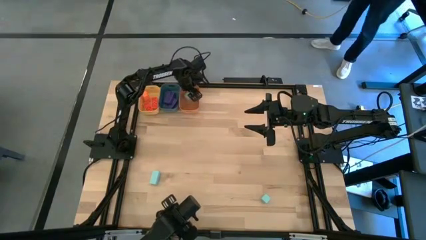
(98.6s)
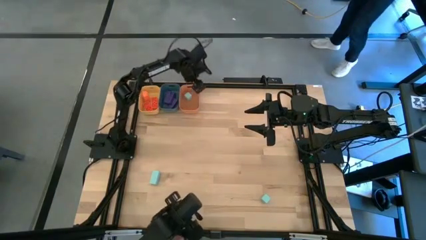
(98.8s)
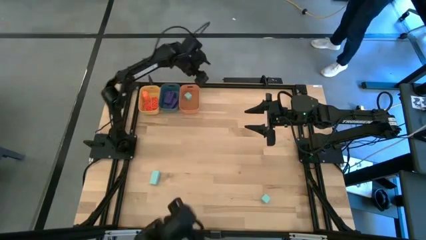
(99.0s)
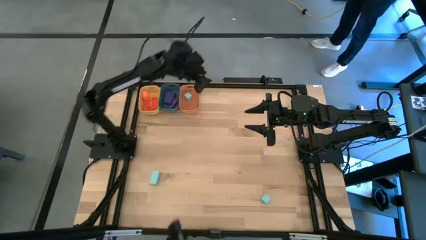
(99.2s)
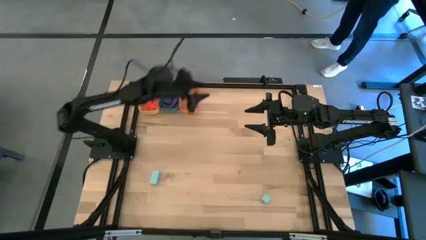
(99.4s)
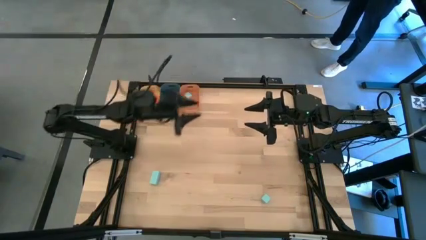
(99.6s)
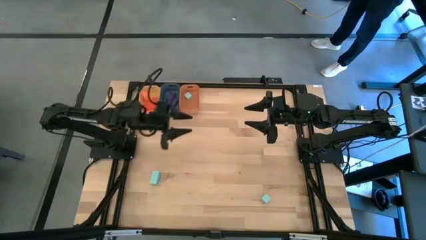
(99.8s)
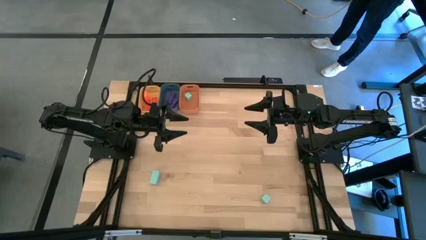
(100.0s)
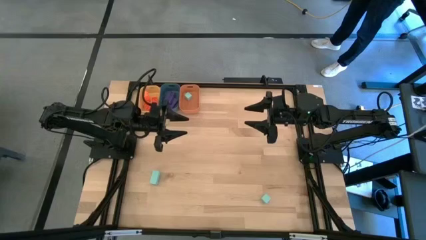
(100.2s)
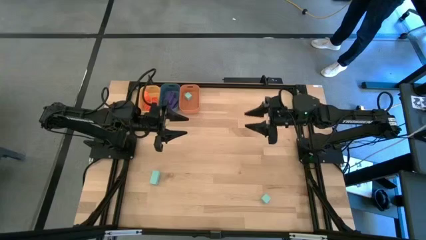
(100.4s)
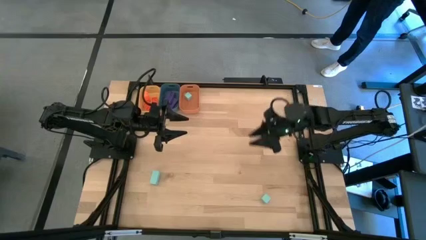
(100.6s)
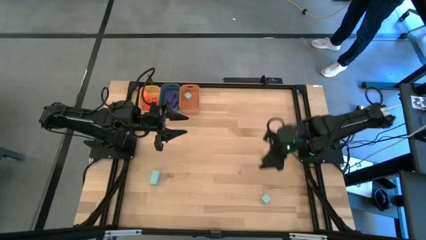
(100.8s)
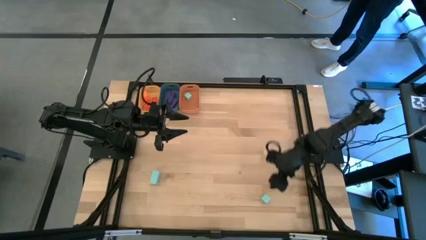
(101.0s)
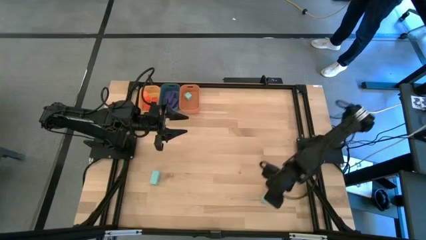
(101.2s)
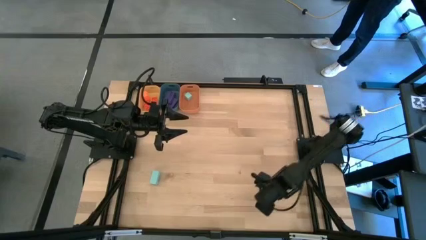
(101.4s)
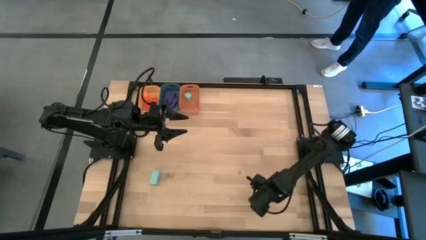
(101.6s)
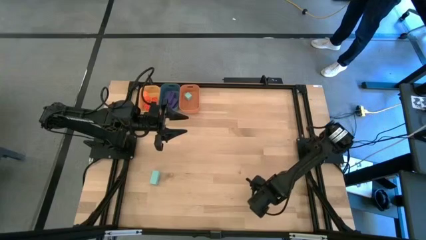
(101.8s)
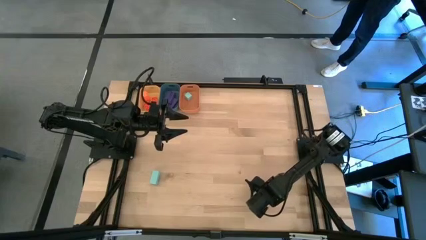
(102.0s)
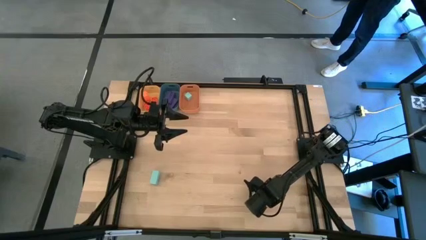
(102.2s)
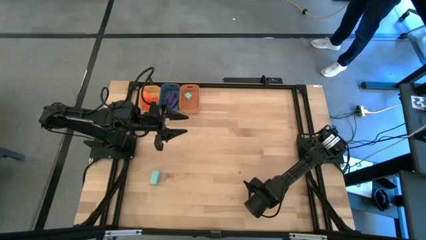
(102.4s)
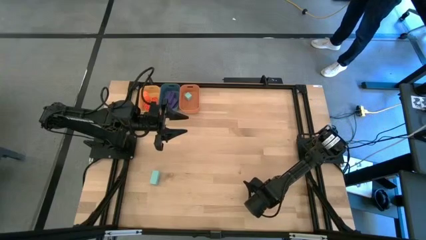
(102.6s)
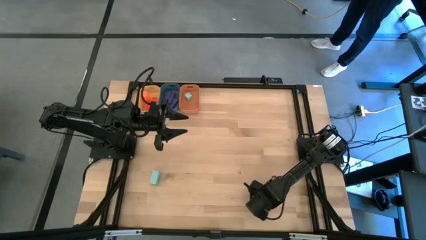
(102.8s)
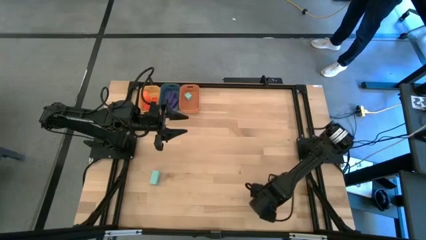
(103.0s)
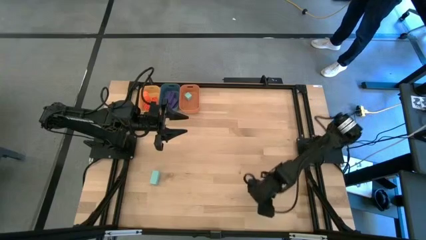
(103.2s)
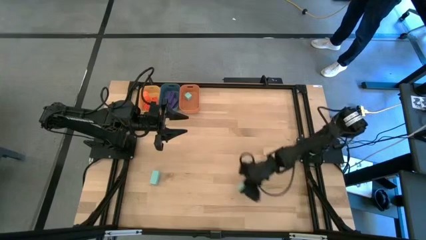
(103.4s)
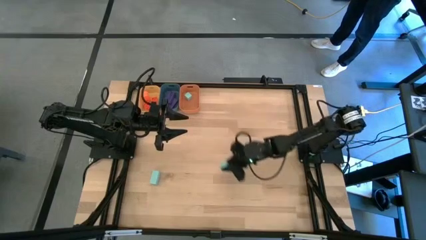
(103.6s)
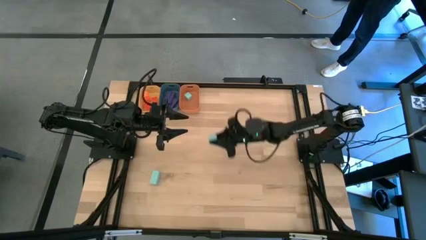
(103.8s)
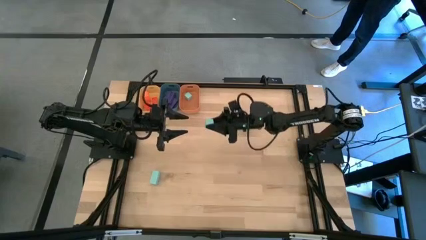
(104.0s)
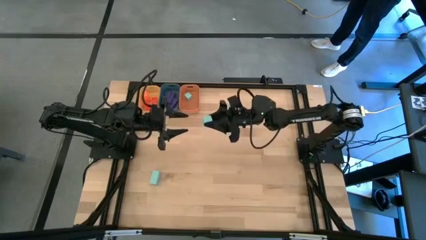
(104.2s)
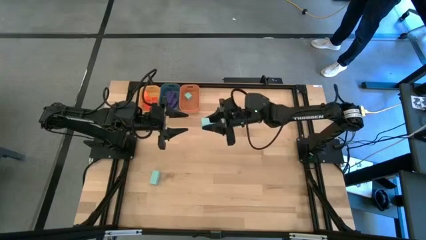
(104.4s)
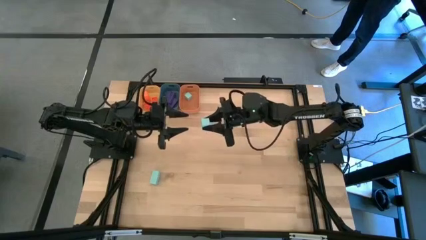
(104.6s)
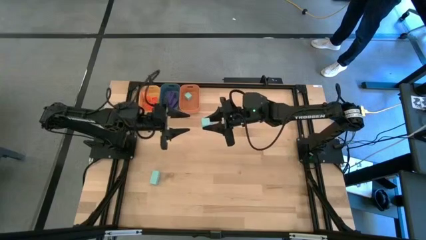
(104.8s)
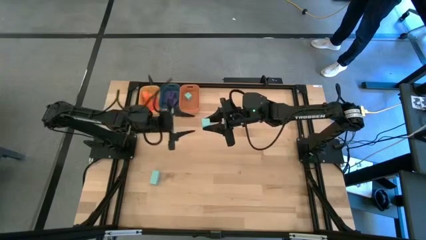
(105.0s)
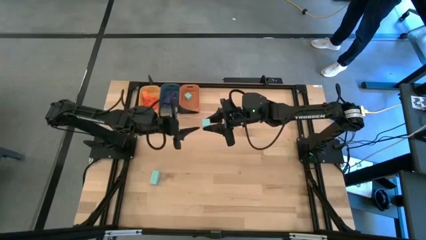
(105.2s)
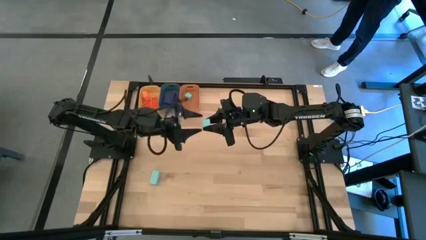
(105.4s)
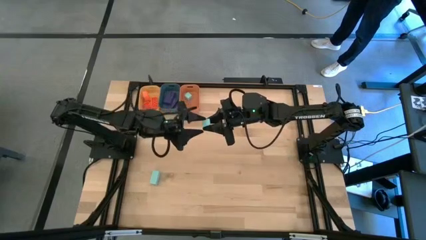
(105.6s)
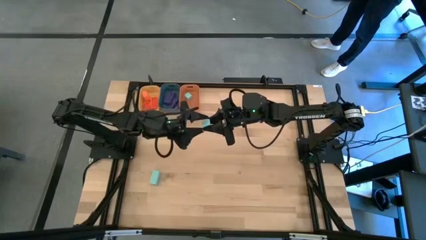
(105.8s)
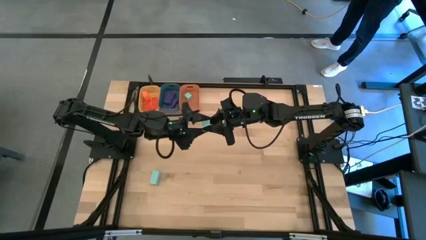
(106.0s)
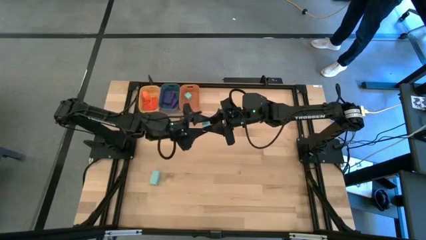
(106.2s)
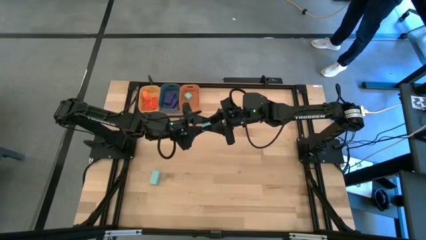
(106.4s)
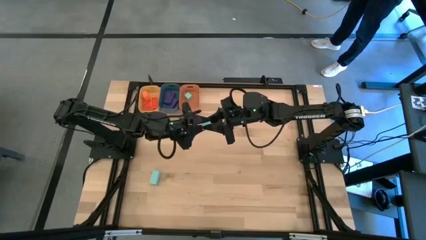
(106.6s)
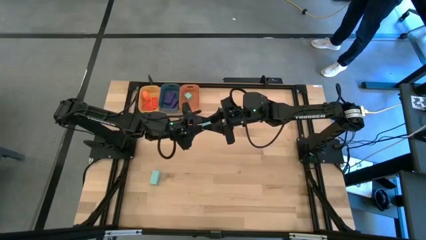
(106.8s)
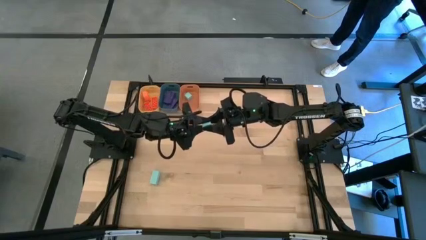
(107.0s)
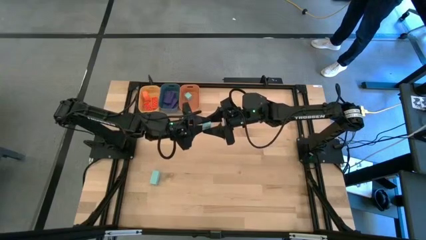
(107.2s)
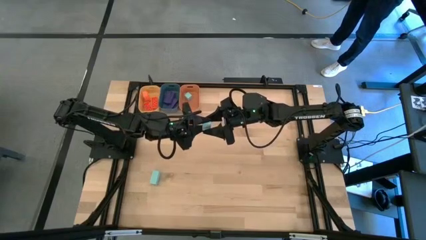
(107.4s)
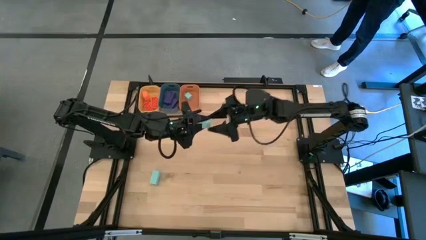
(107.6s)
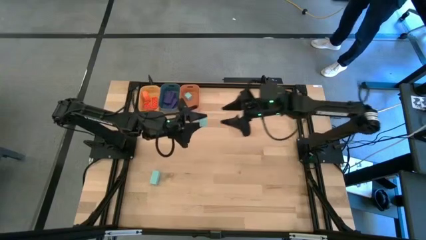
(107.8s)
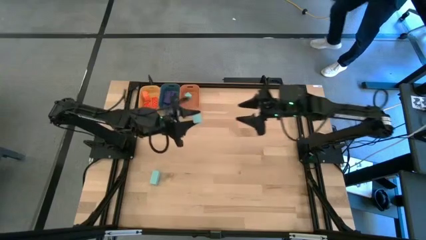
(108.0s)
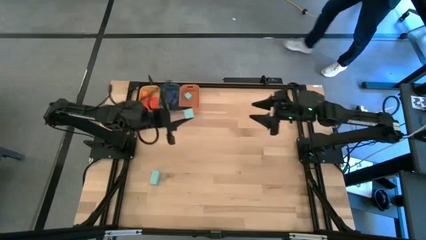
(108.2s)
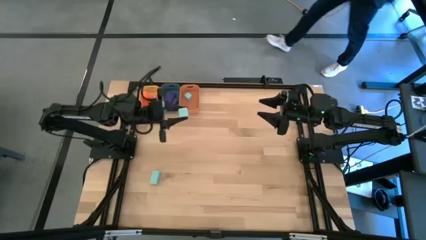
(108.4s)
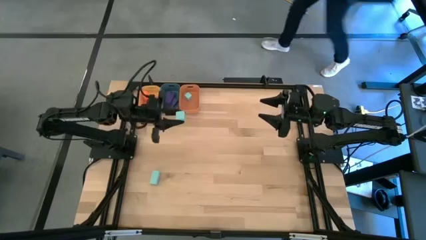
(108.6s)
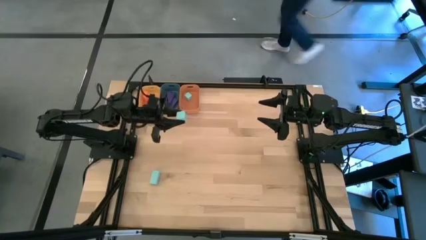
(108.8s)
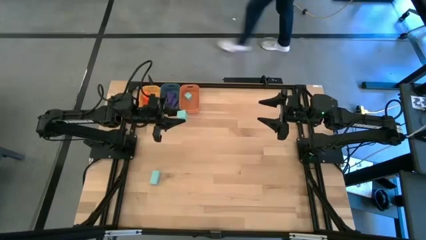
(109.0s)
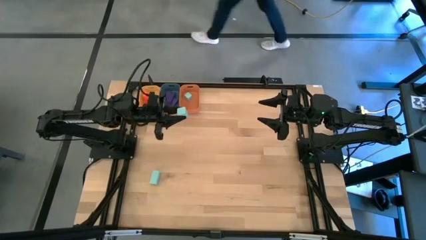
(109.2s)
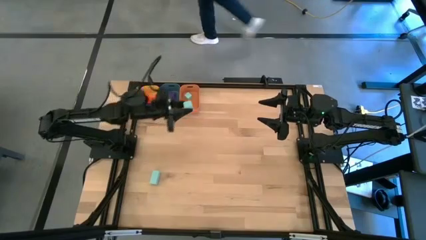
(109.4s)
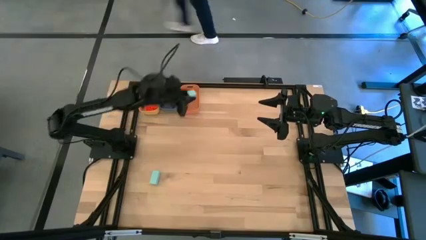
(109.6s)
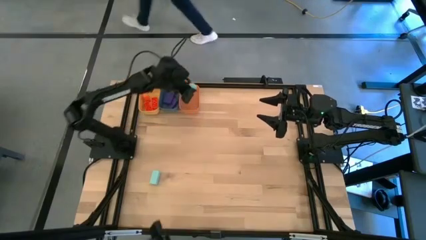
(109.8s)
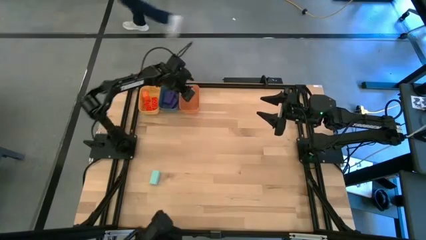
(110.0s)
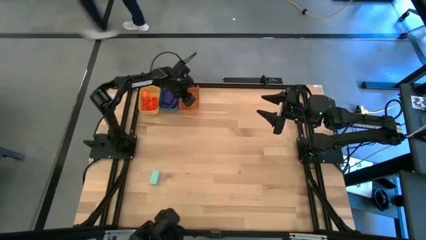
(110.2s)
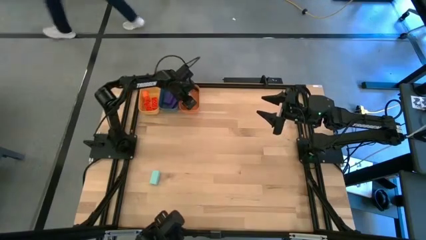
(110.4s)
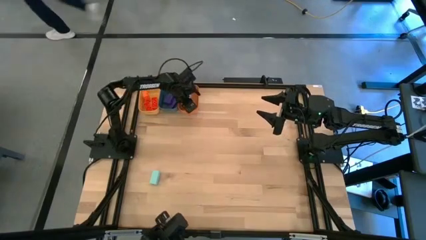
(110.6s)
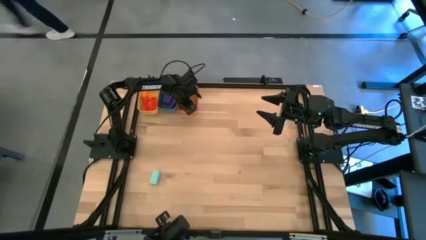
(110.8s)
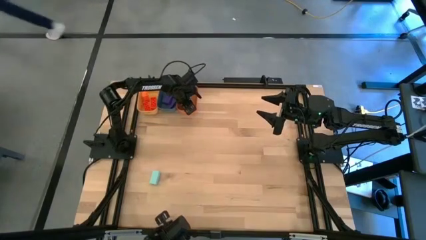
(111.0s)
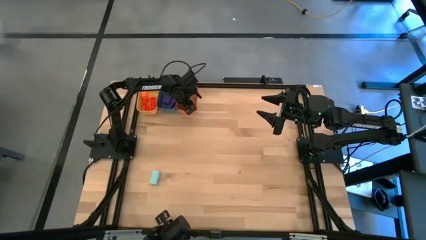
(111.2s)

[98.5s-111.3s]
Task: Sort & place blocks by color
Put the right blue block into the orange bin

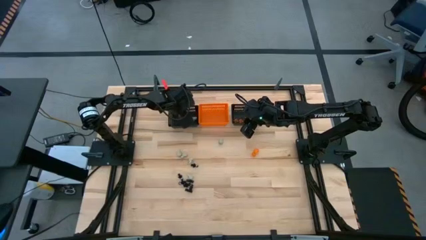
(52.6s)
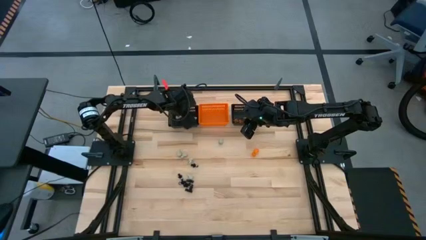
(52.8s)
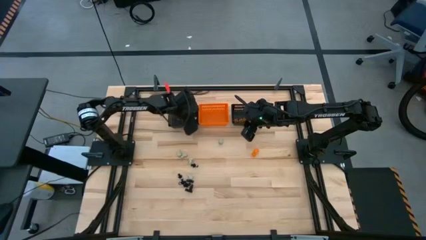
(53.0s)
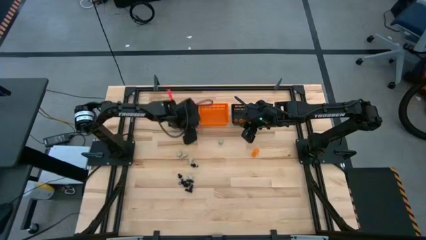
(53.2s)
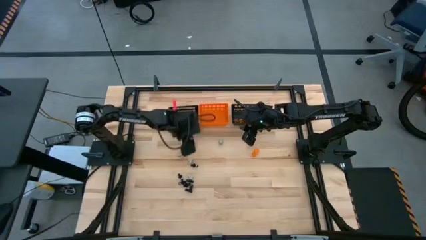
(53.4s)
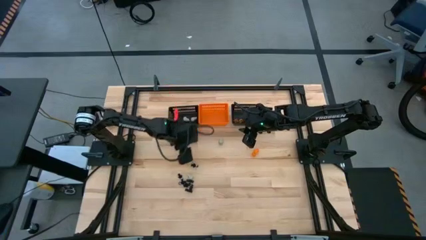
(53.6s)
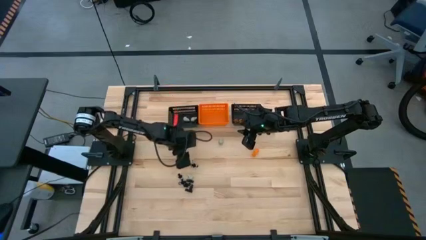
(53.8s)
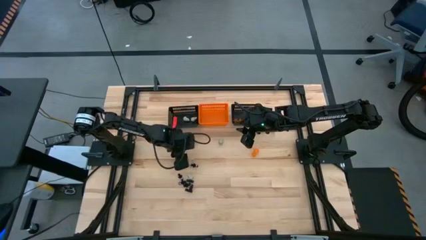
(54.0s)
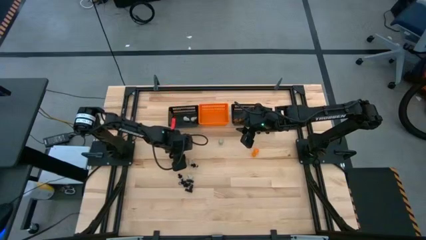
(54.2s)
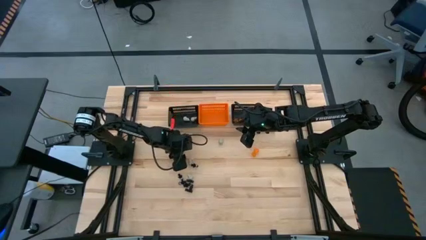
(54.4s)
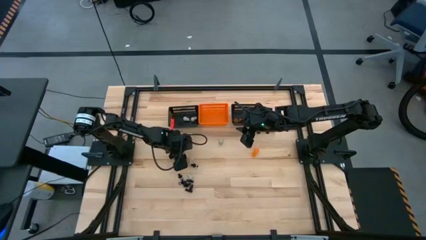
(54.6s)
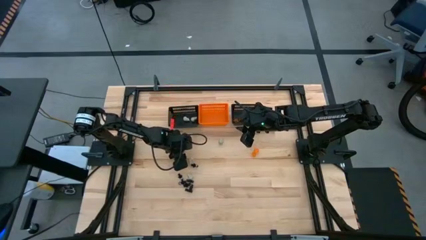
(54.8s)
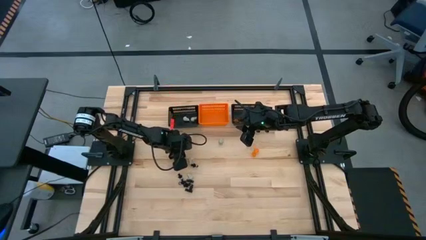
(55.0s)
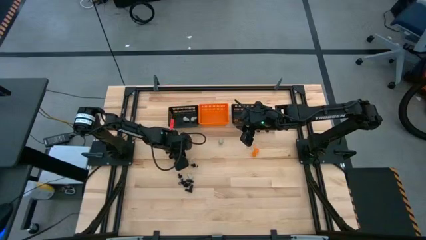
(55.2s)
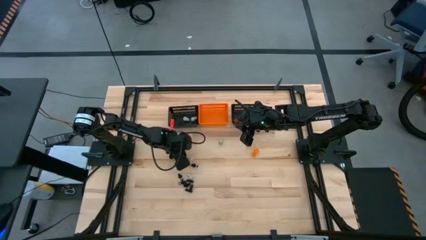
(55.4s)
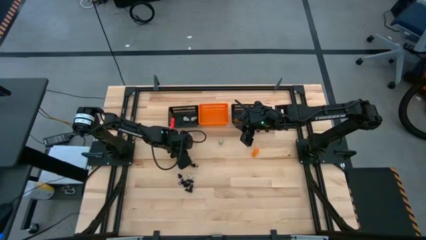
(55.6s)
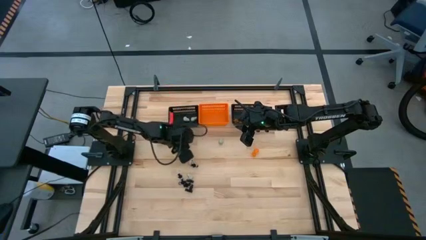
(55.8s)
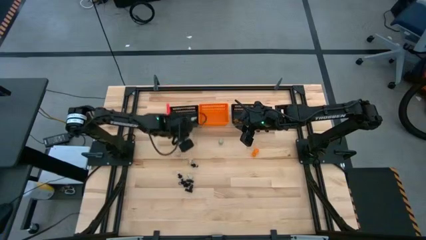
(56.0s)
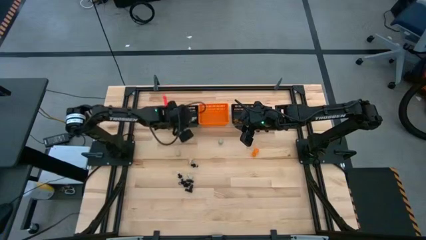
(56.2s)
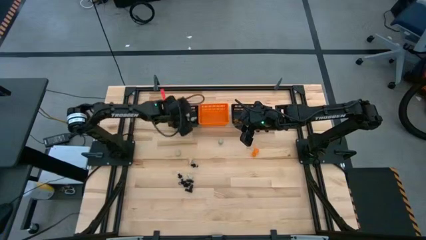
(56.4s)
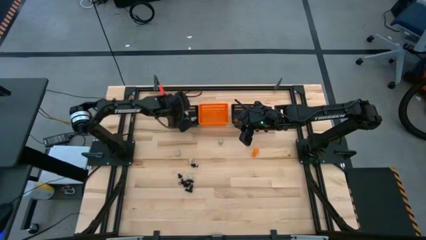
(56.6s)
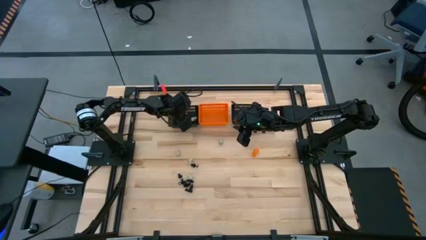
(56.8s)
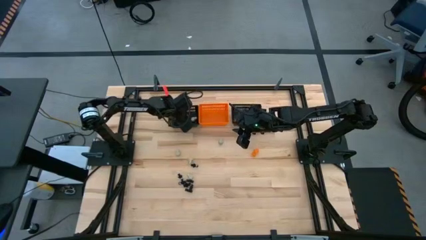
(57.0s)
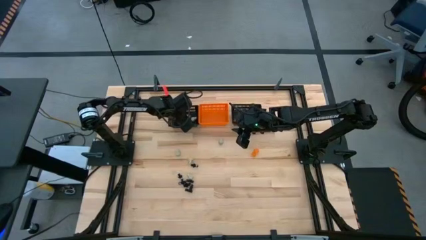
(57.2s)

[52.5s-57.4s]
Task: Sort Halloween decoration
Put the white skull toy into the left black bin
